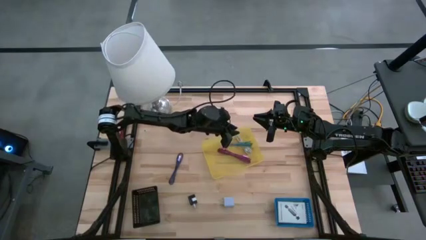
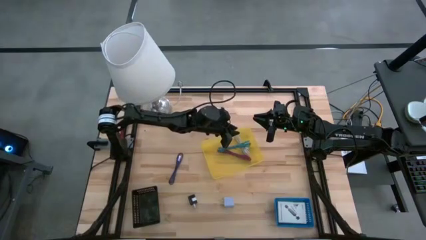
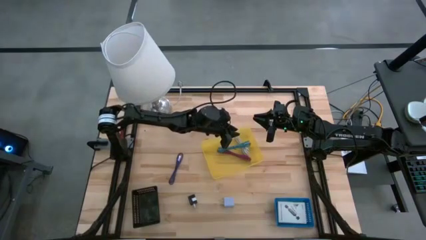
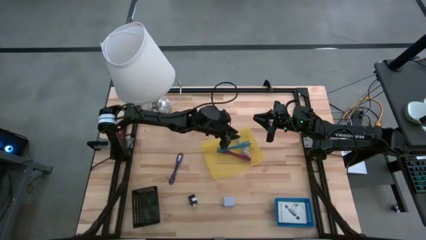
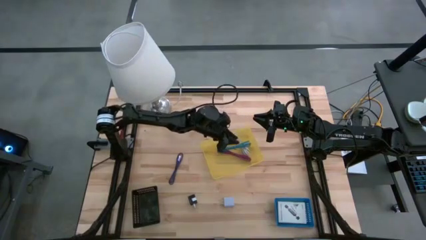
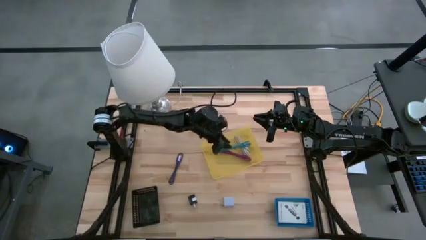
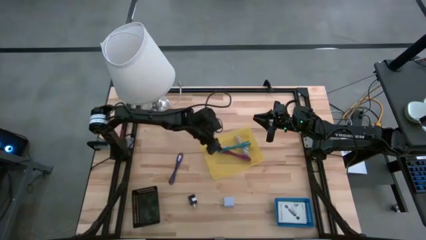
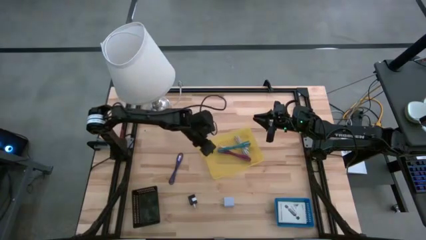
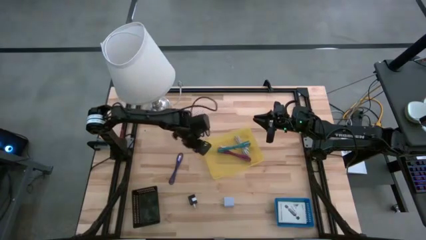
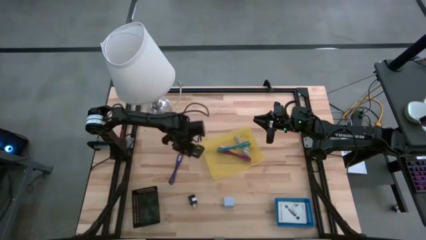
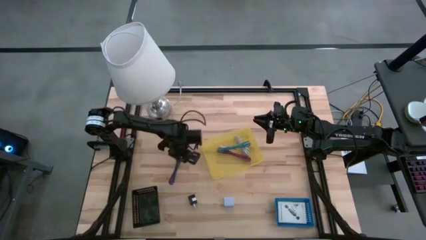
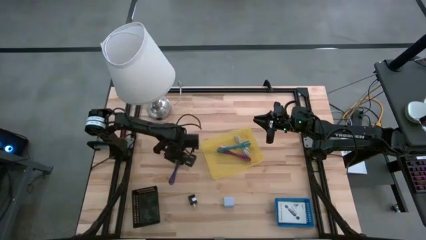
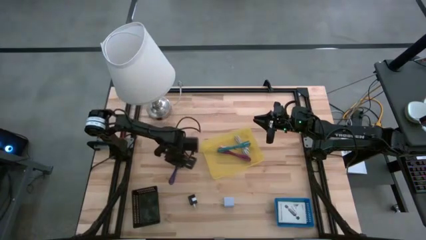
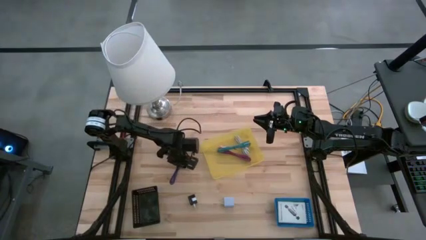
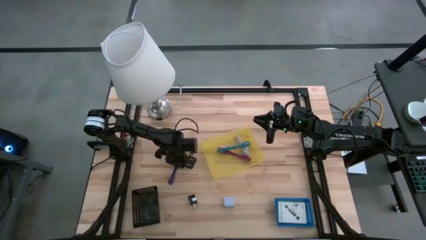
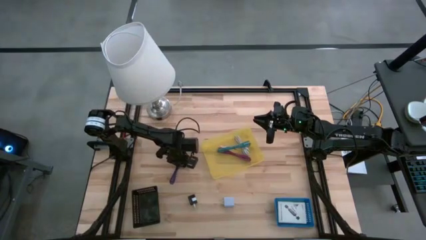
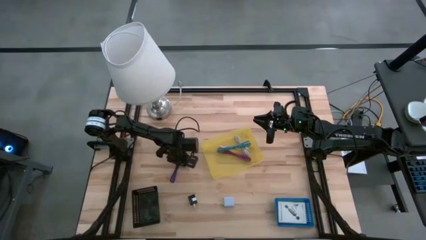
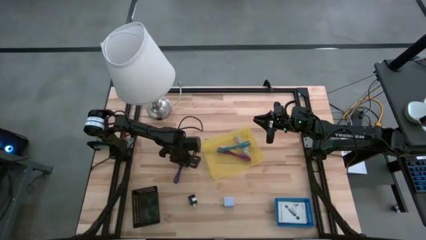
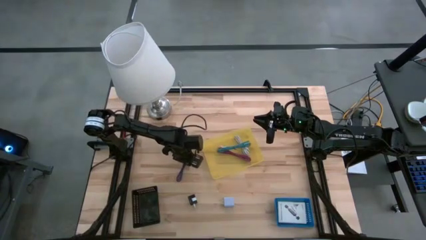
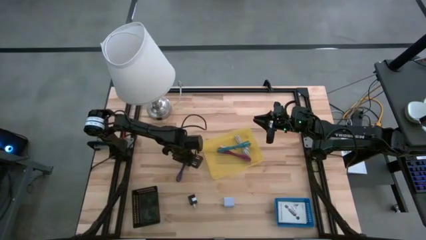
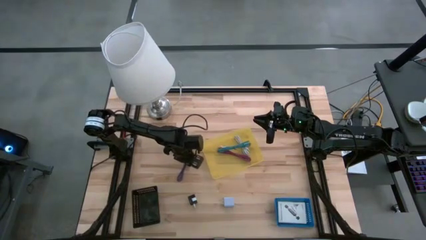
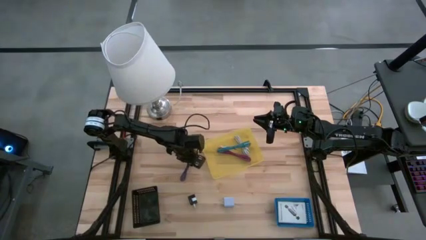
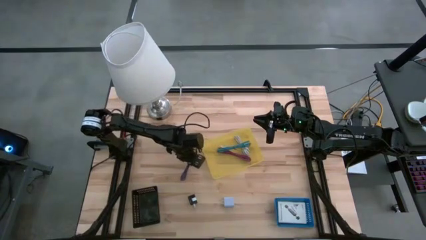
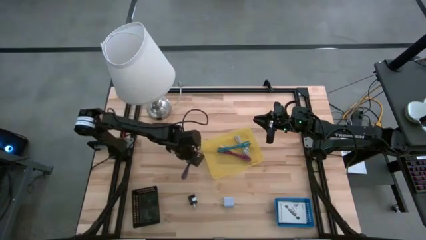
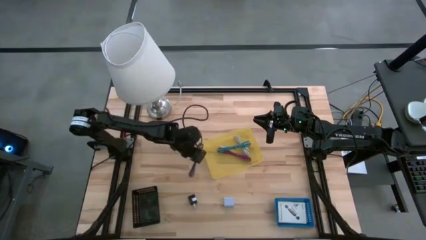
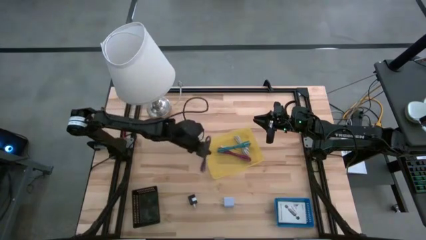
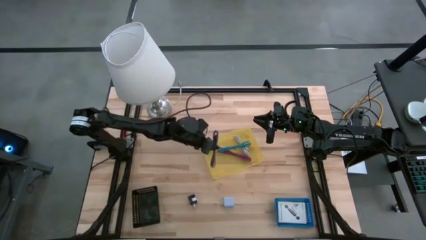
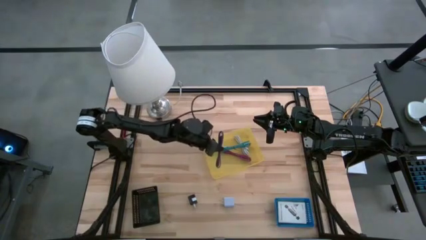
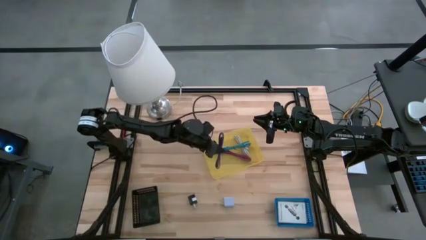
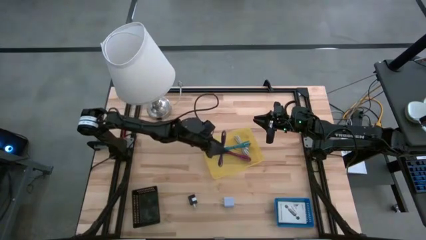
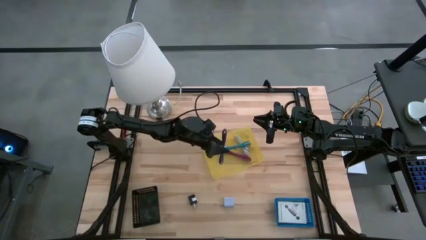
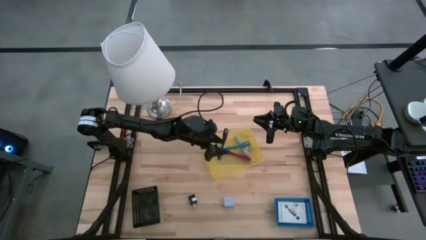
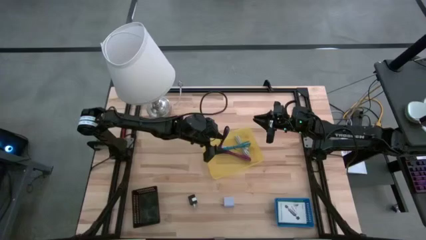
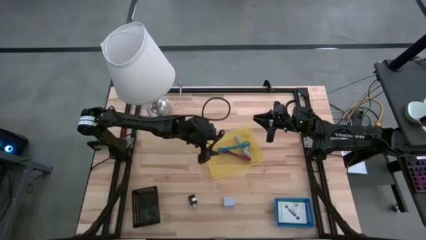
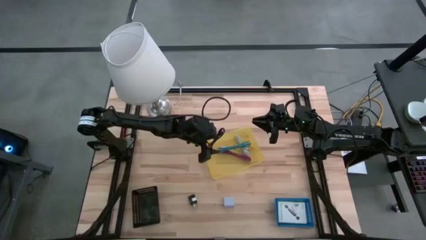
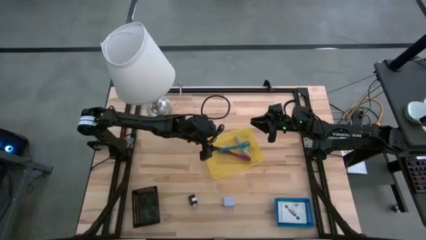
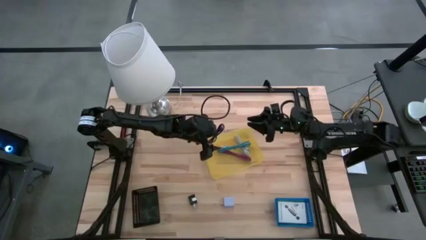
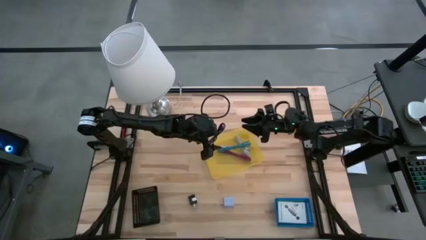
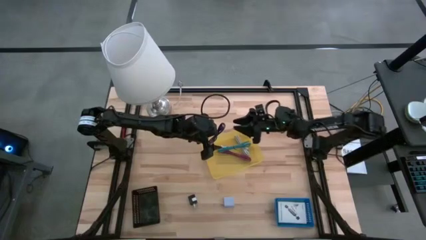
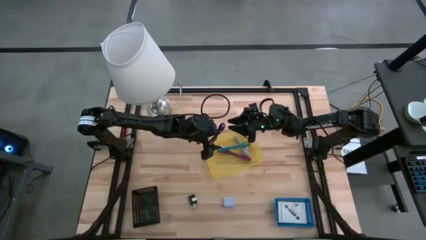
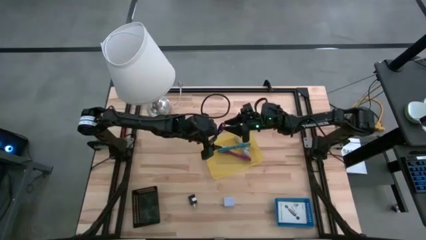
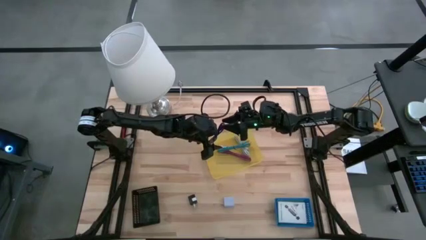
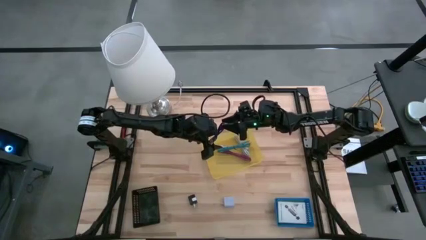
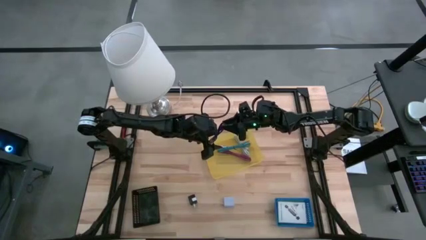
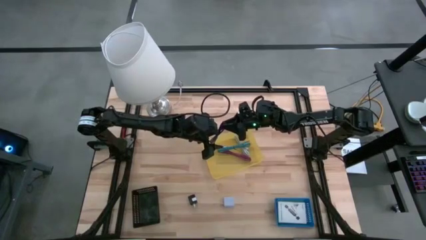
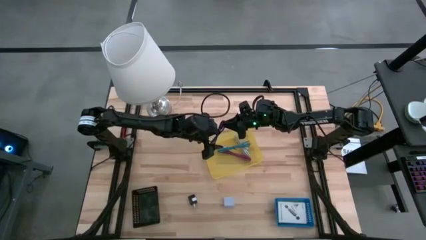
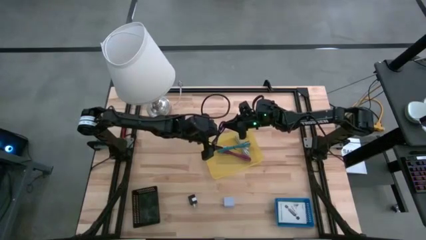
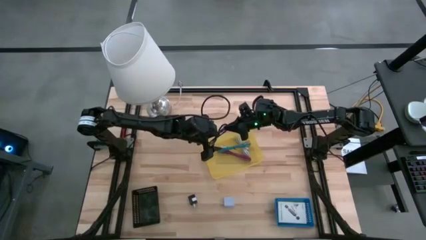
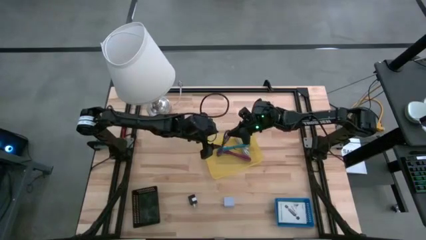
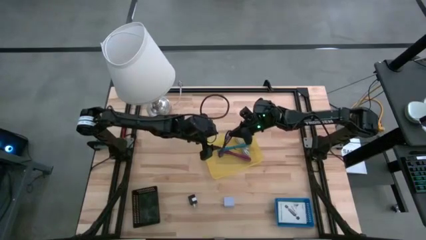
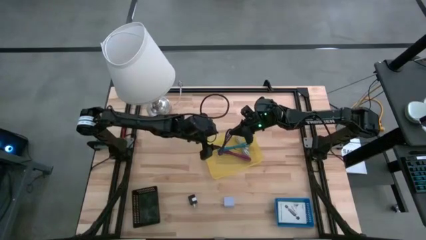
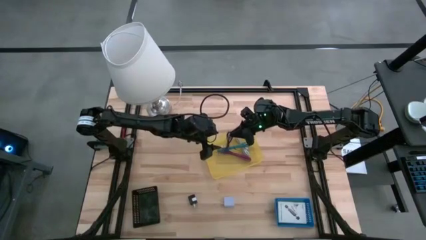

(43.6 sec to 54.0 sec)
Task: Pick and place items into bin
Put the purple charger cable into the yellow bin

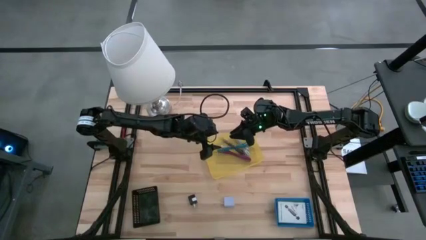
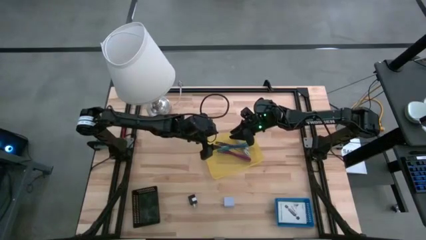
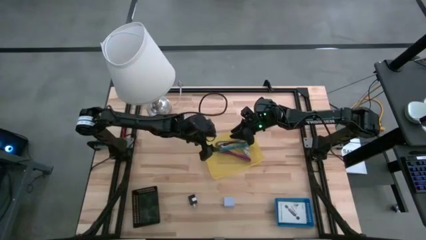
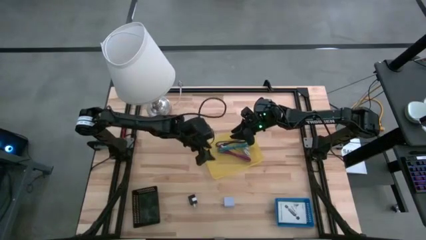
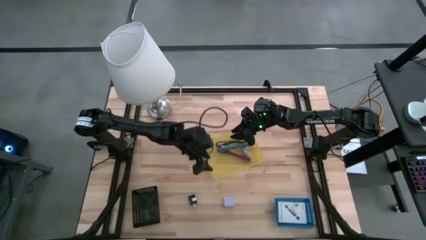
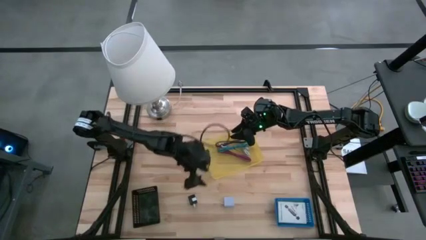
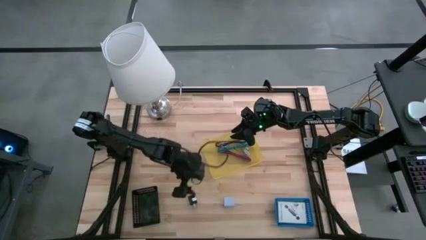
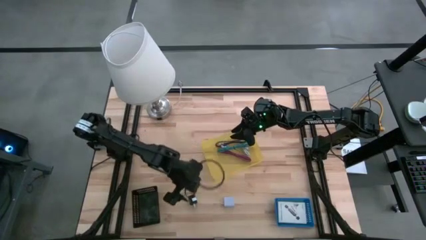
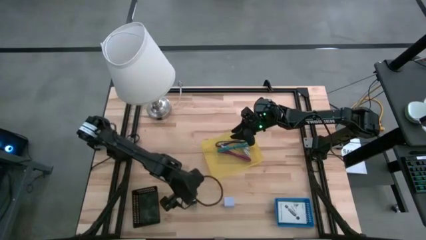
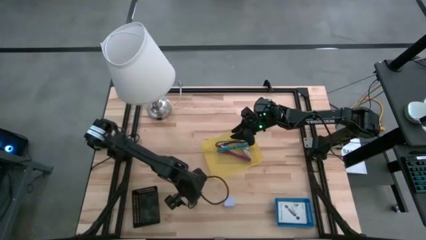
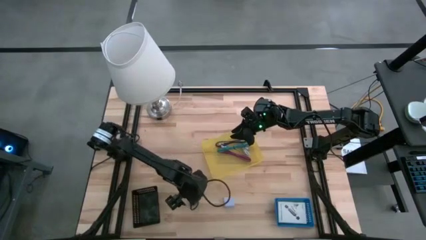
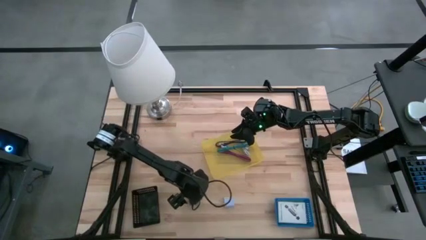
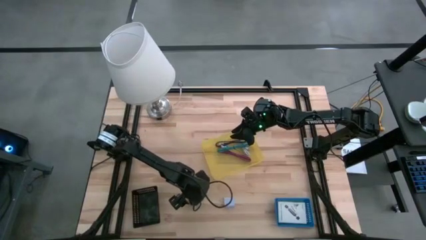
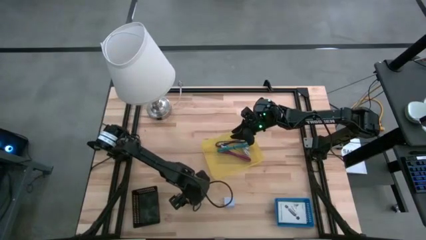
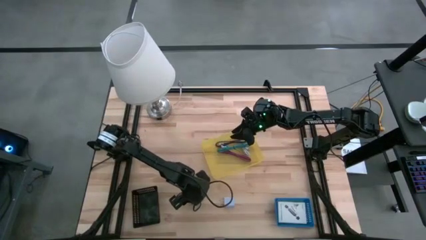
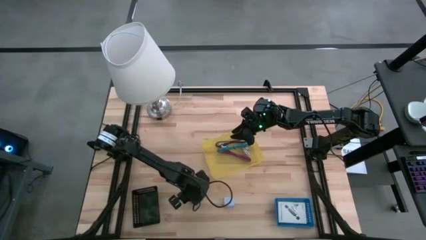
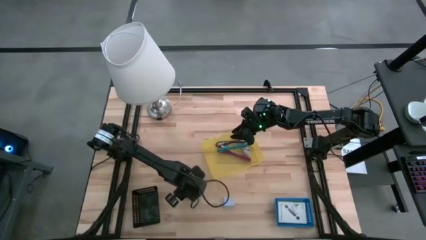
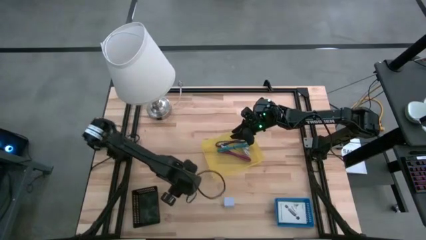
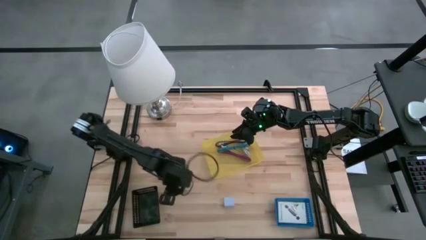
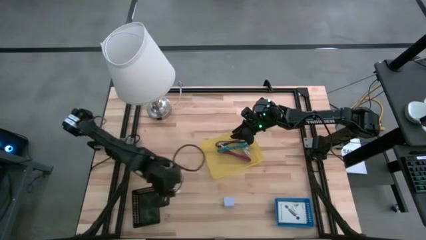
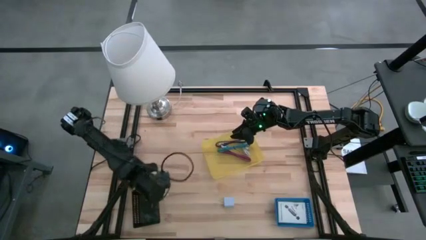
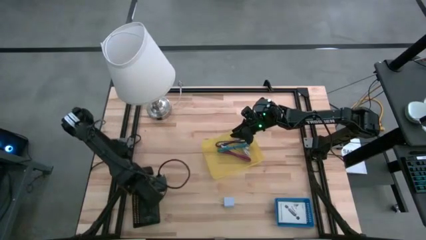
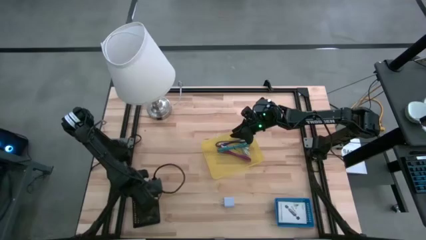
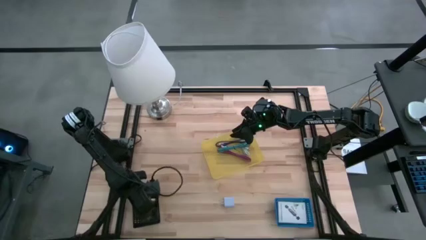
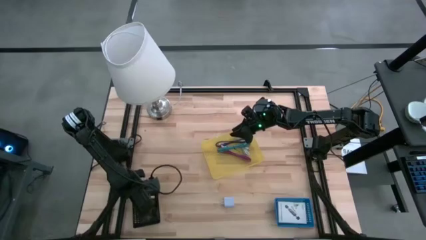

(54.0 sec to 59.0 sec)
Put the black charger adapter into the black bin

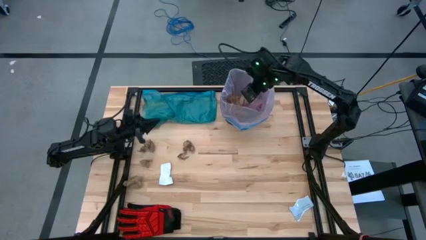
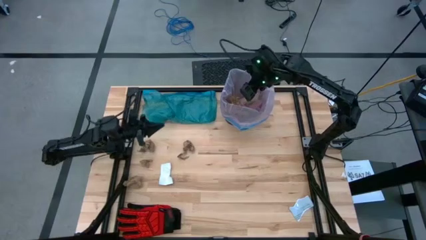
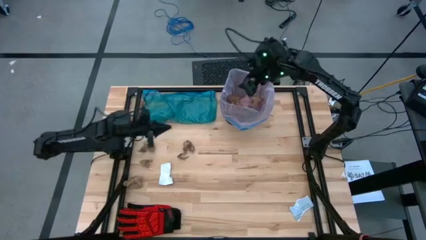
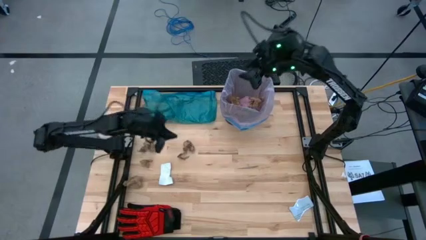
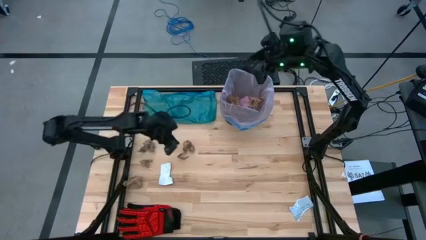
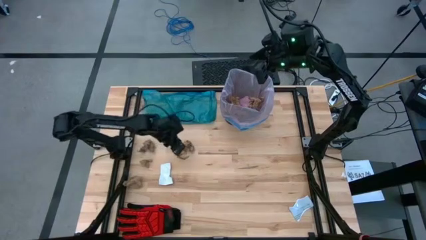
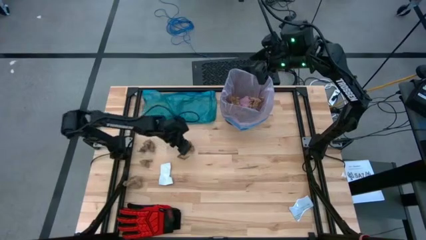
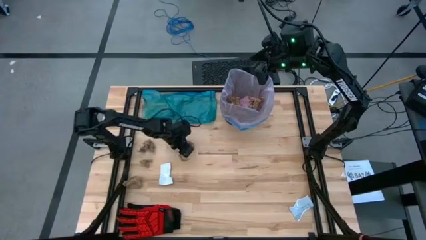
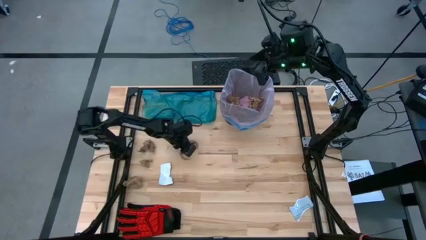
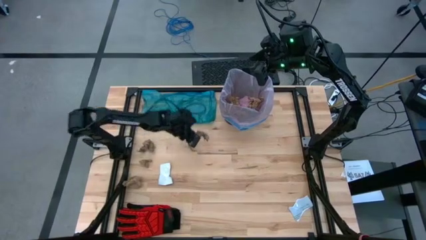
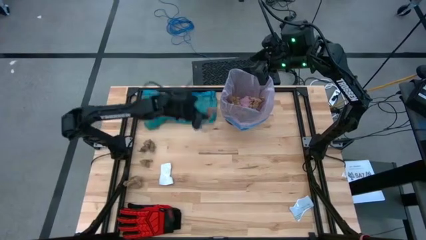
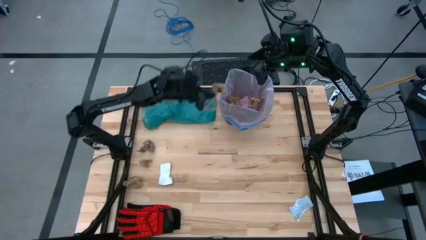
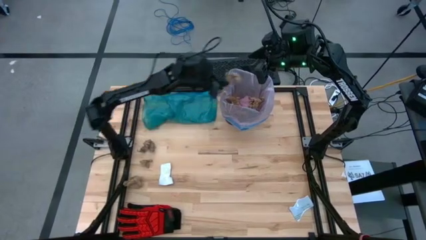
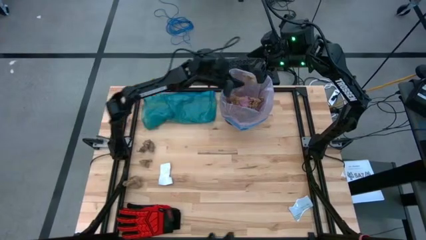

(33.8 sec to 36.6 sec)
Task: place trash/remove bag and relplace
Put the brown paper into the black trash bin
